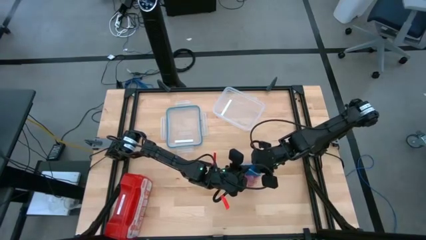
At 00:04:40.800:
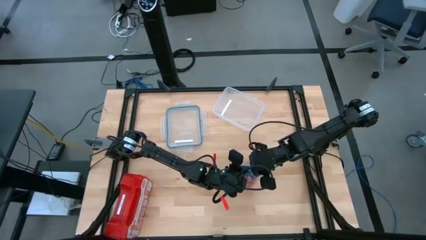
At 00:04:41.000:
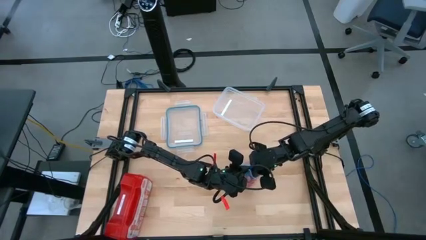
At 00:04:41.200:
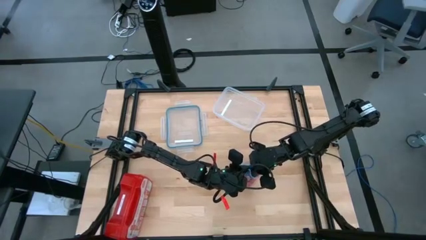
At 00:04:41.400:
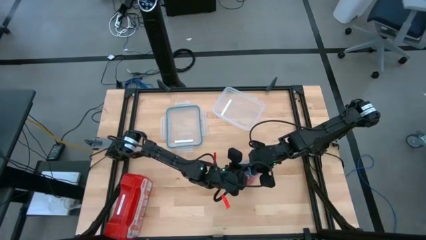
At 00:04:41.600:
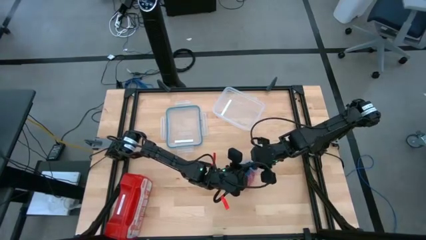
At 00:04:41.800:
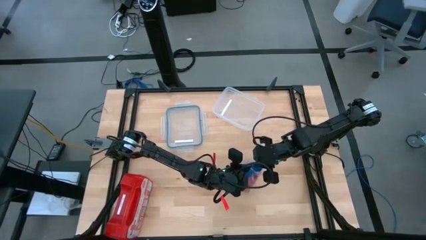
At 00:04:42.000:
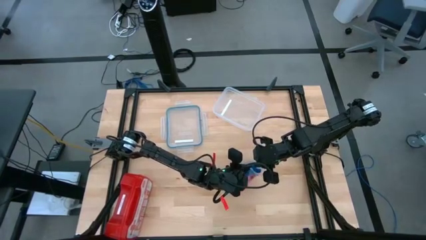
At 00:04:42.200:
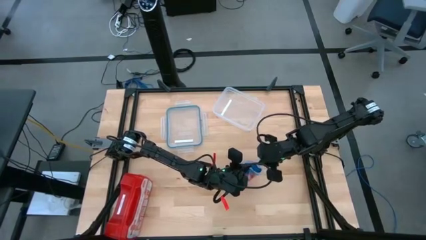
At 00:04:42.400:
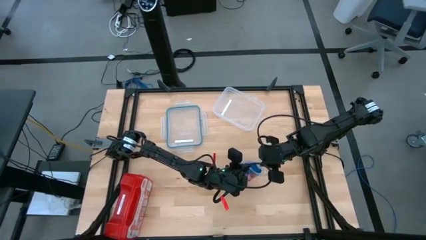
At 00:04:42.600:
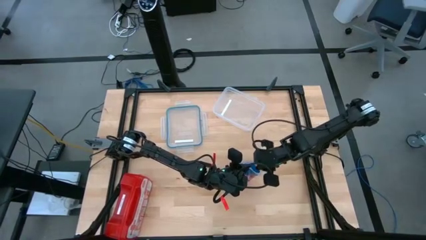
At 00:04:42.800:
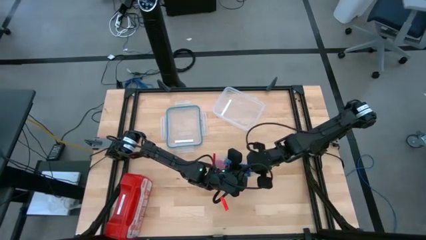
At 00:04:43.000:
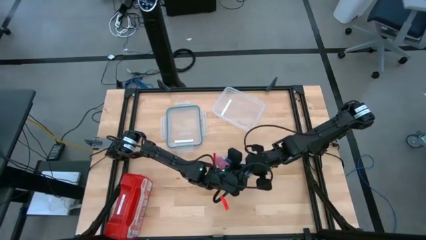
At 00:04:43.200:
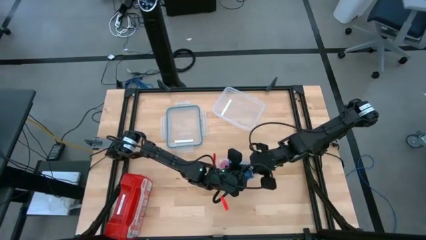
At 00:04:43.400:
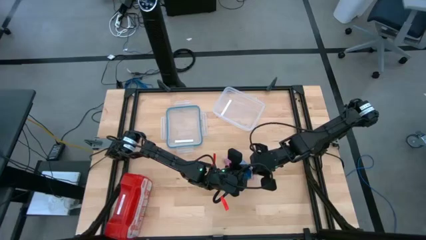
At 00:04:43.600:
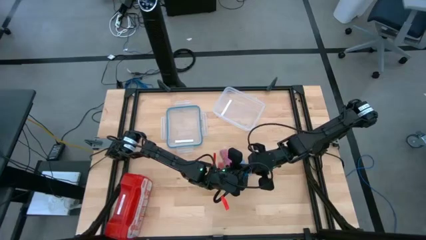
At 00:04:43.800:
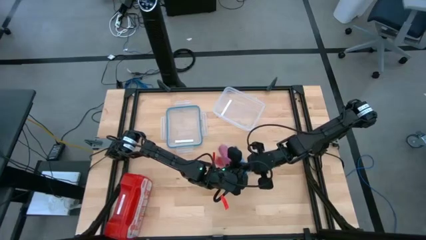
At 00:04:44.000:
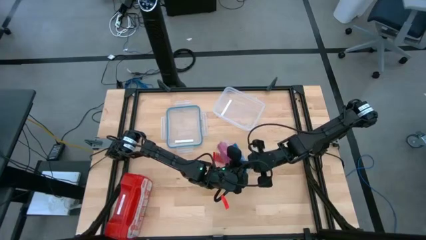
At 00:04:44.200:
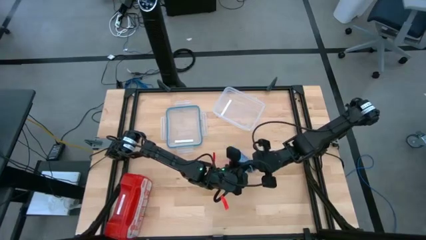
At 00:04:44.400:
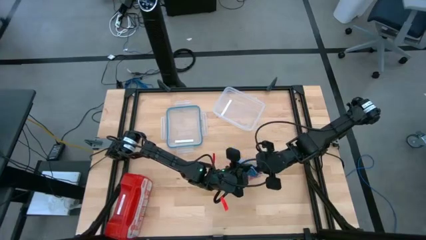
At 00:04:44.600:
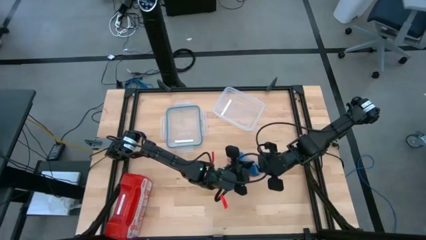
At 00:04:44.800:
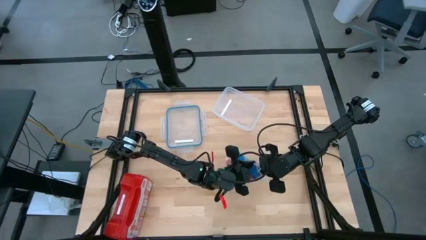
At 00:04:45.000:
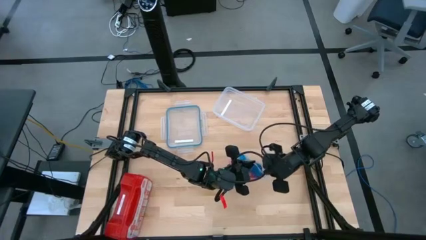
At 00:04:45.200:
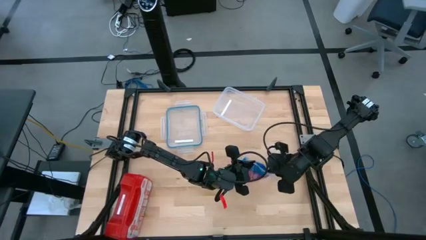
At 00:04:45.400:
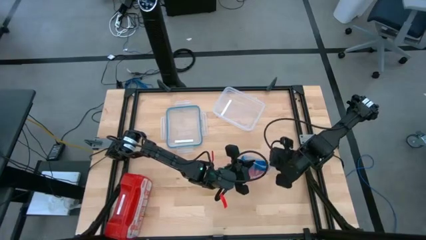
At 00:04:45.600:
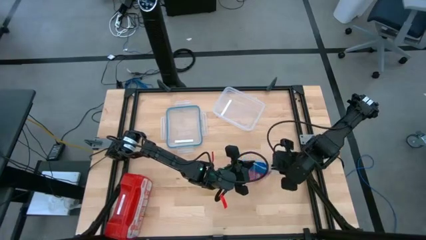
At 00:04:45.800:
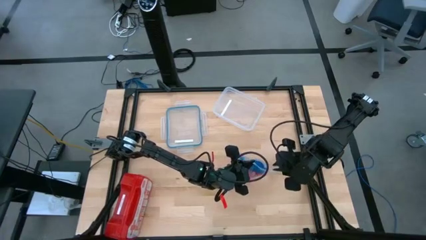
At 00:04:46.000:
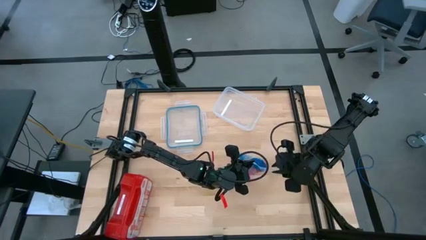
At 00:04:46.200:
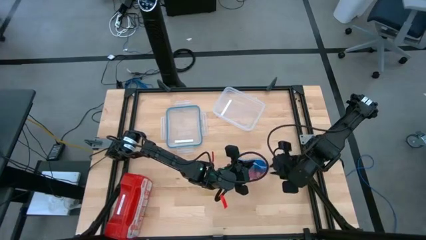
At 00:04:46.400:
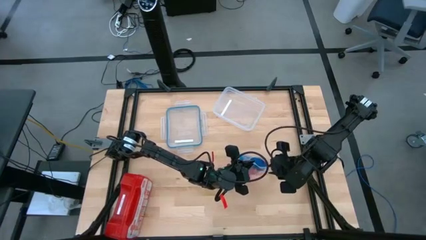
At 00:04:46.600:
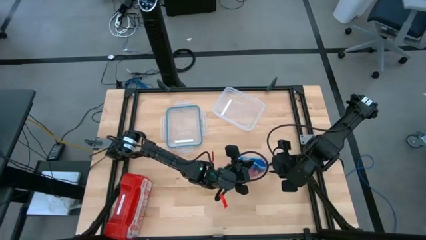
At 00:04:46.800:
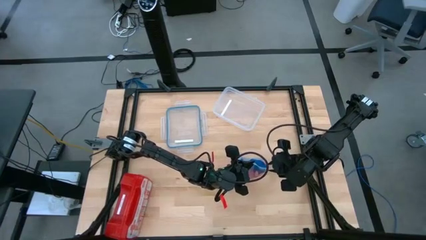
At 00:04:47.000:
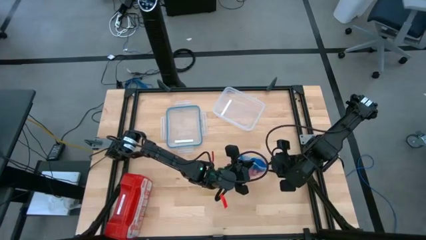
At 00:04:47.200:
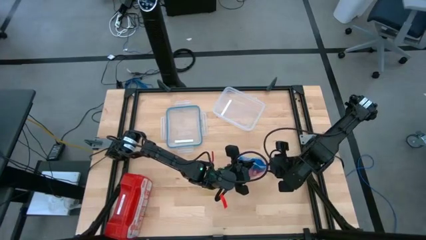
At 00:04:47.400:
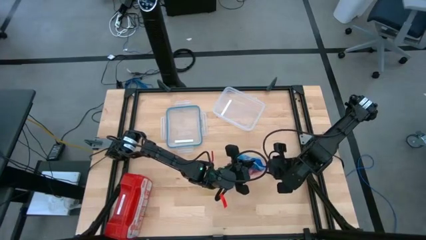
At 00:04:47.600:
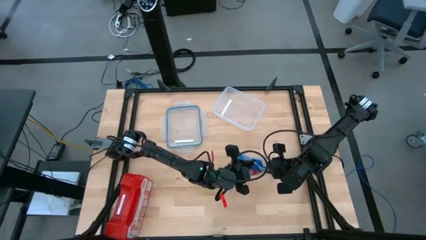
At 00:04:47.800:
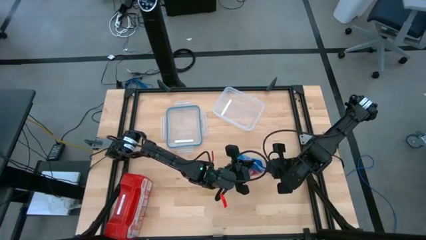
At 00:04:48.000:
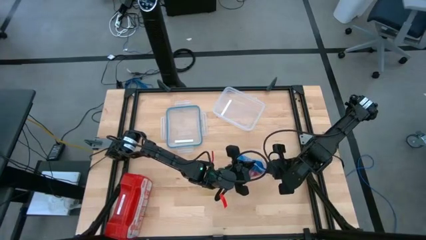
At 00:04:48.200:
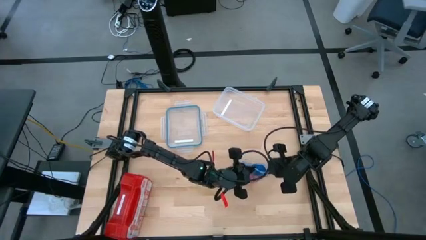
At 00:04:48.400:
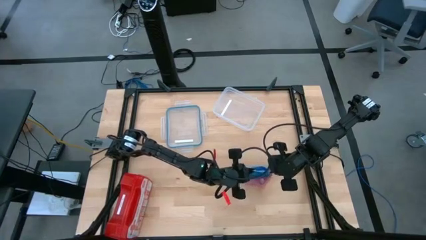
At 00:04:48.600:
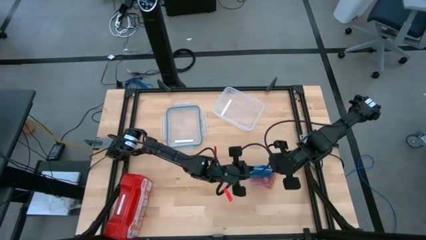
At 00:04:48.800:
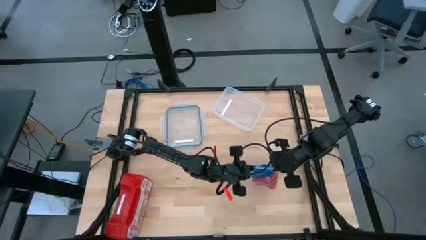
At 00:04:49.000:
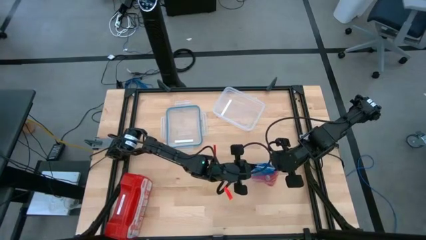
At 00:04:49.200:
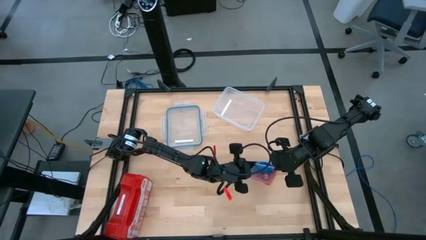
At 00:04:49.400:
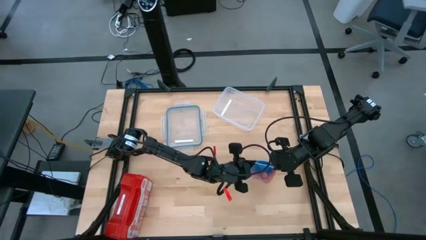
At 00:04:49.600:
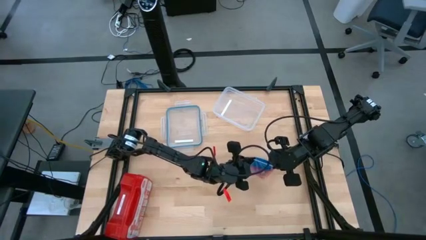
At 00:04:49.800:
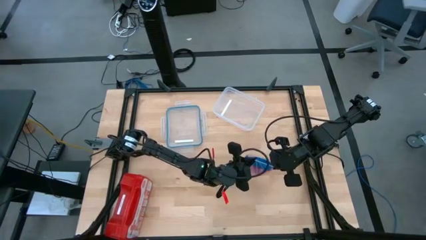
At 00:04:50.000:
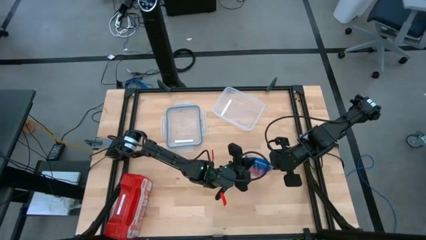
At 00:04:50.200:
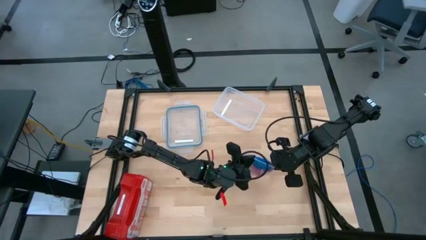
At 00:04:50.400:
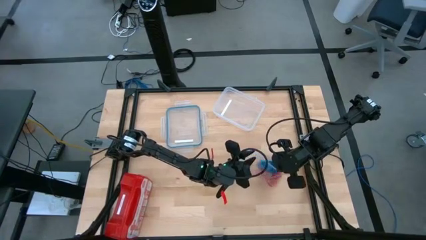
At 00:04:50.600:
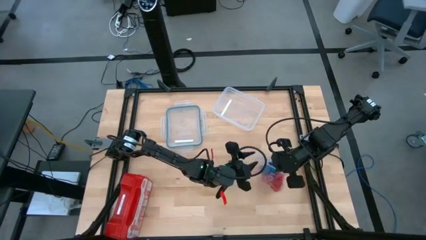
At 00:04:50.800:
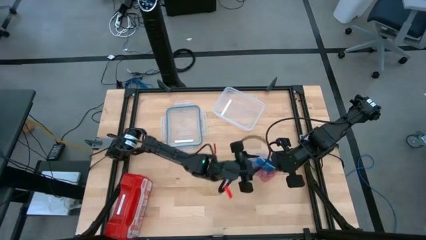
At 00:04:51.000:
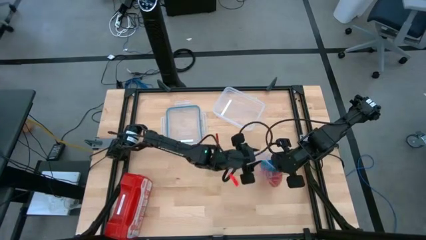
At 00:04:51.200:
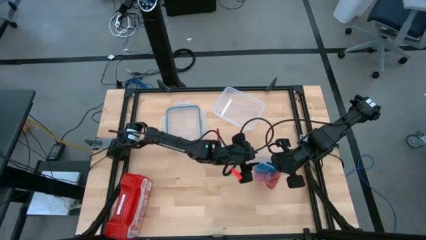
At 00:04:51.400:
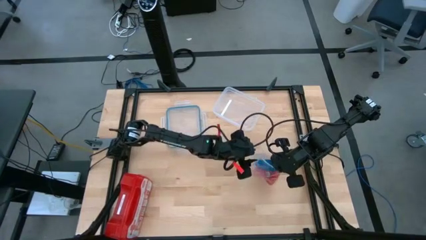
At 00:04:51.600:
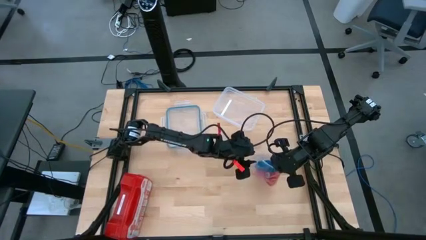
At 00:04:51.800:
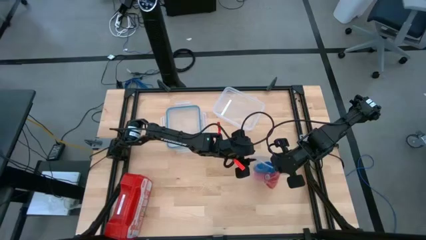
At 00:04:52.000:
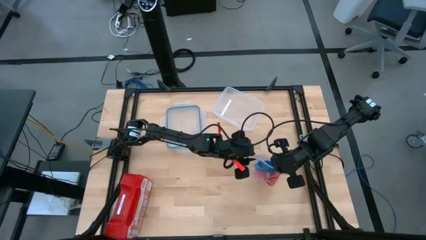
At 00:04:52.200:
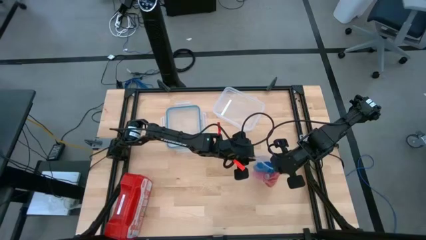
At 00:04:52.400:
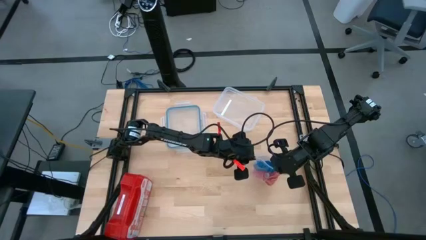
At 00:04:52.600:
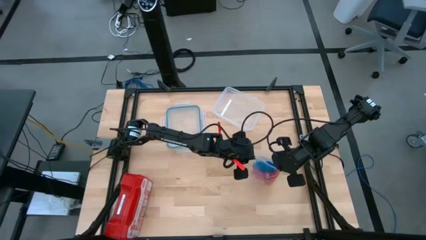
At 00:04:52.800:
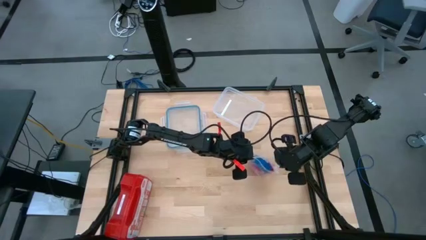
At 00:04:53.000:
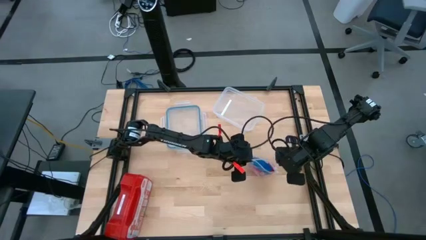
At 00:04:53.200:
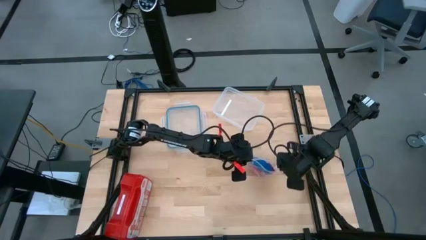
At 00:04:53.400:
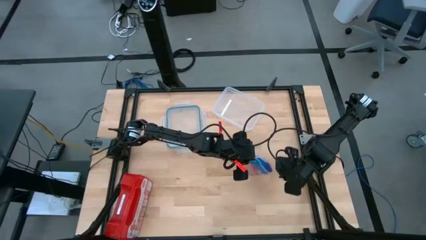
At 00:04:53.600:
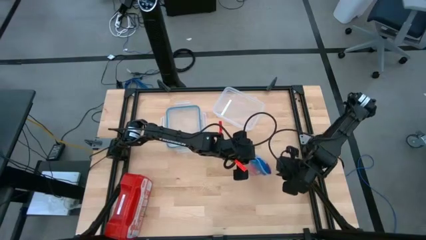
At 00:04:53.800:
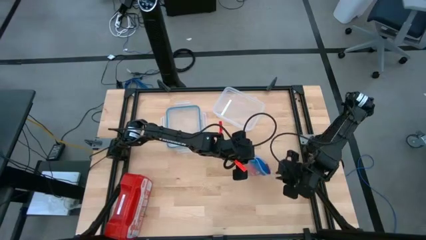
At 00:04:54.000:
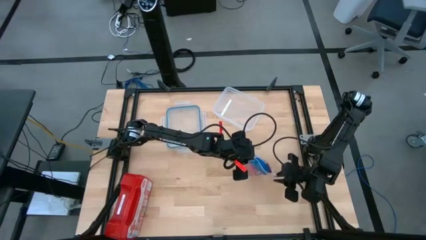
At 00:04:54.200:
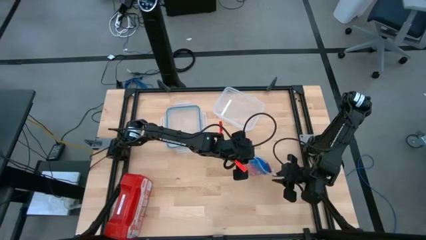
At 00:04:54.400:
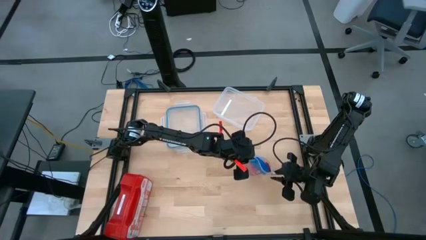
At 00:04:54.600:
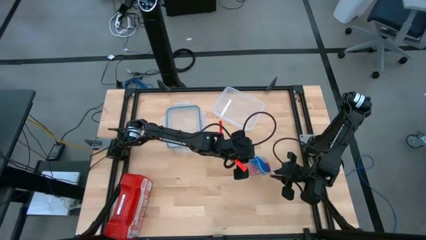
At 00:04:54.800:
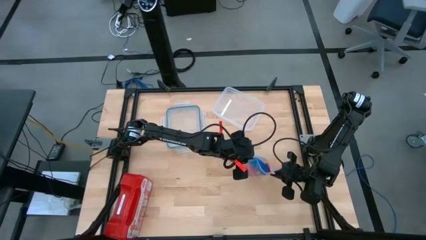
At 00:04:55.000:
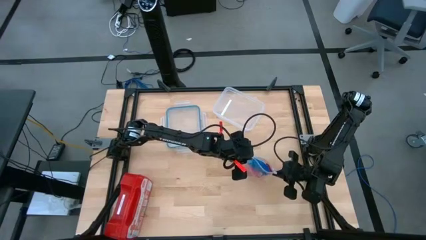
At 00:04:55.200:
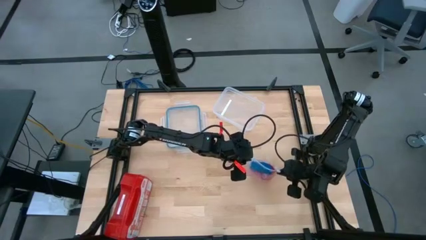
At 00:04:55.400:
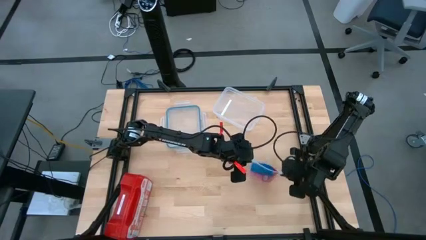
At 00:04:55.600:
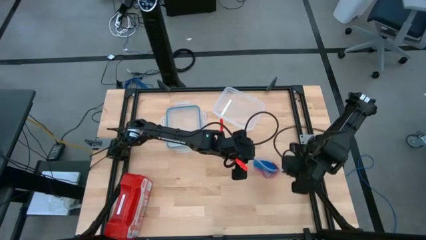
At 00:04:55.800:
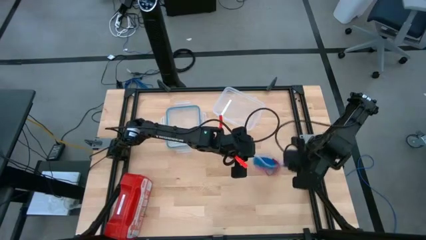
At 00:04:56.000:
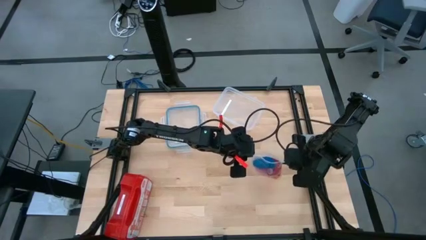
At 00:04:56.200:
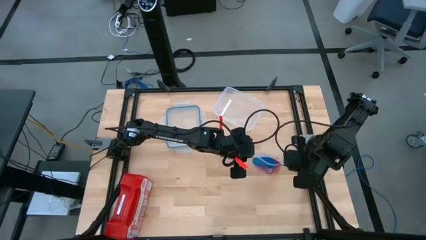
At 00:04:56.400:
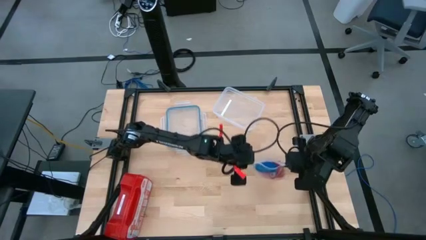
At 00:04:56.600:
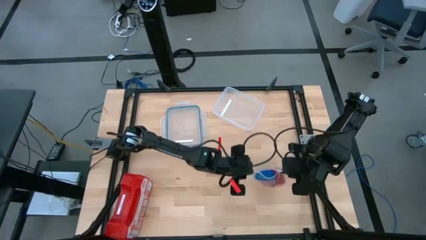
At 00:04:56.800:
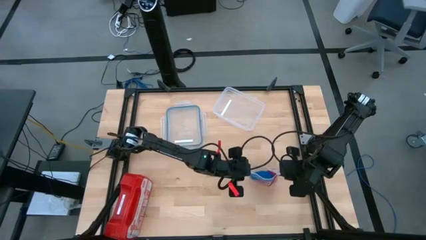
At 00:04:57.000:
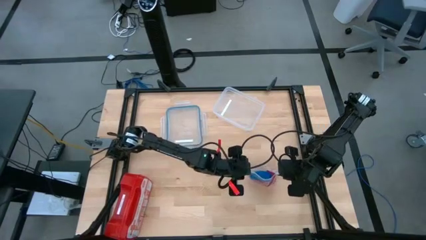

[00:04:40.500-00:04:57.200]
Task: Roll bandage
Put the blue bandage into the transparent zip bag
